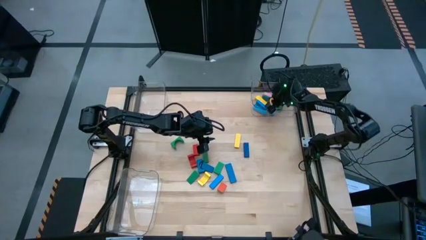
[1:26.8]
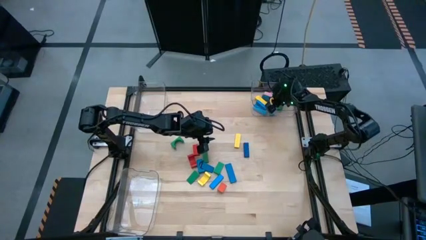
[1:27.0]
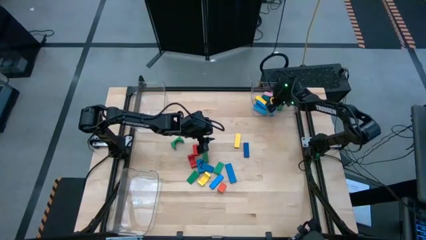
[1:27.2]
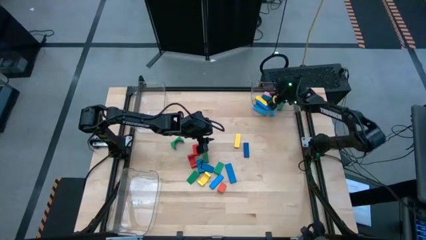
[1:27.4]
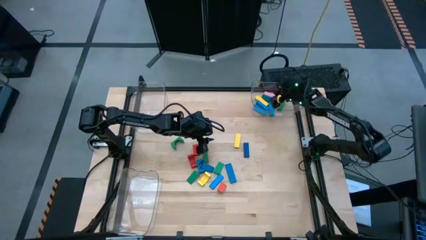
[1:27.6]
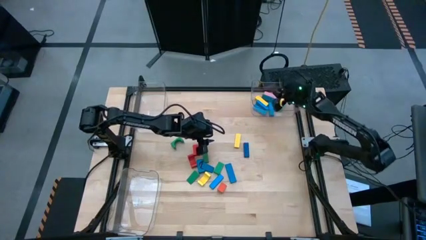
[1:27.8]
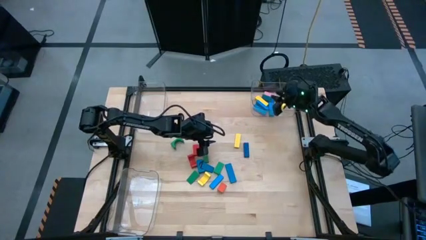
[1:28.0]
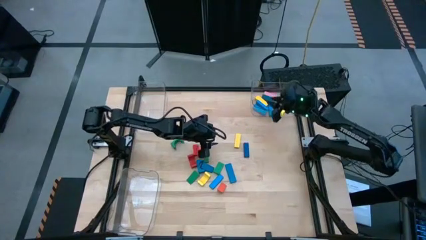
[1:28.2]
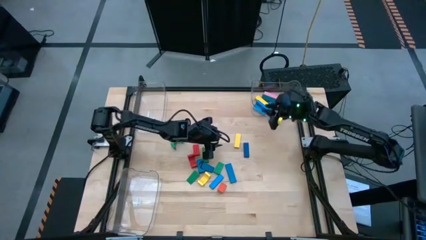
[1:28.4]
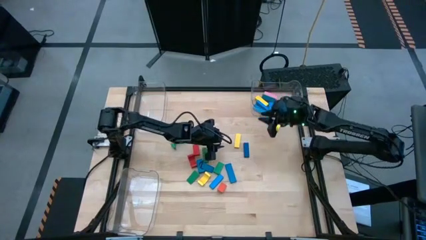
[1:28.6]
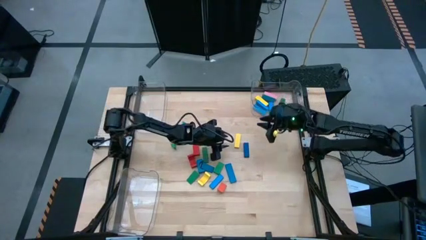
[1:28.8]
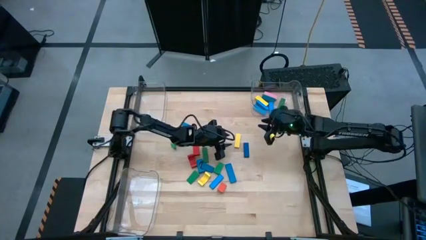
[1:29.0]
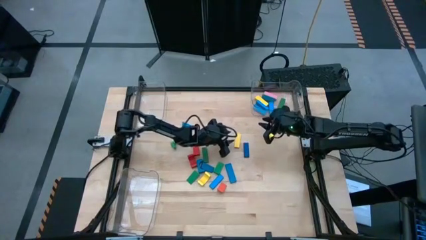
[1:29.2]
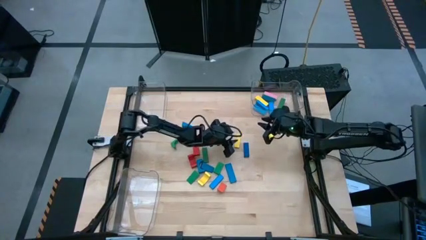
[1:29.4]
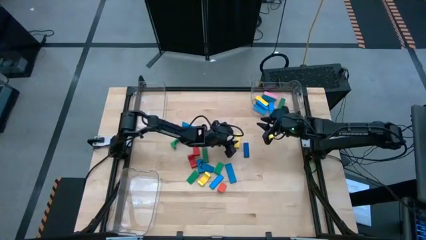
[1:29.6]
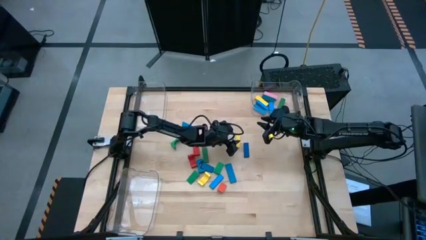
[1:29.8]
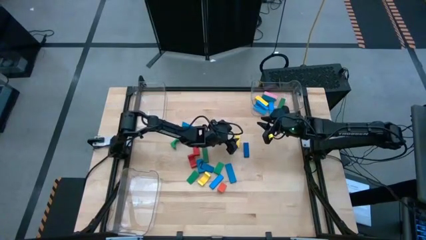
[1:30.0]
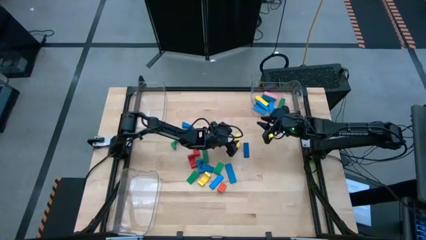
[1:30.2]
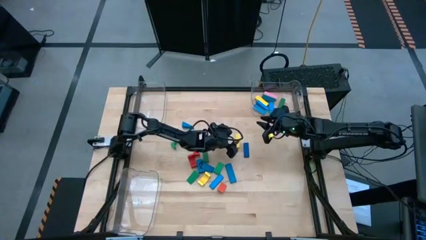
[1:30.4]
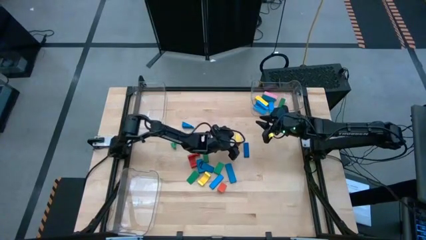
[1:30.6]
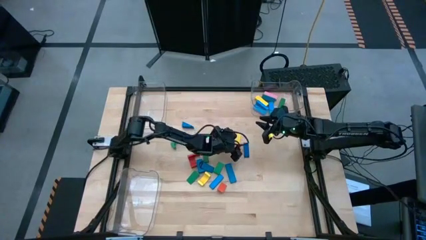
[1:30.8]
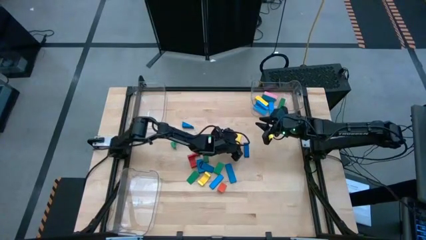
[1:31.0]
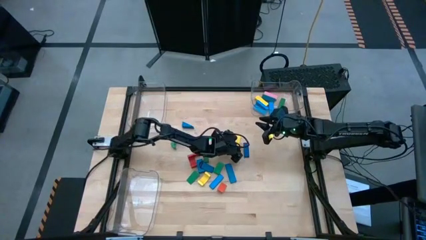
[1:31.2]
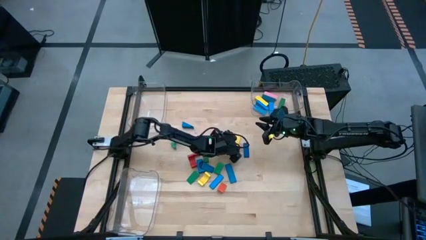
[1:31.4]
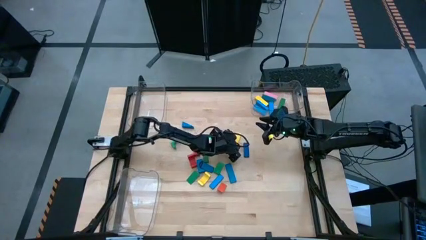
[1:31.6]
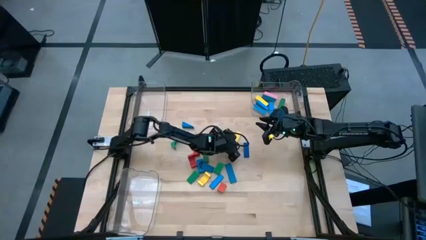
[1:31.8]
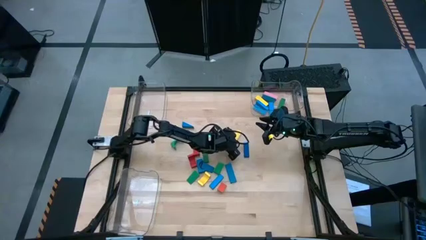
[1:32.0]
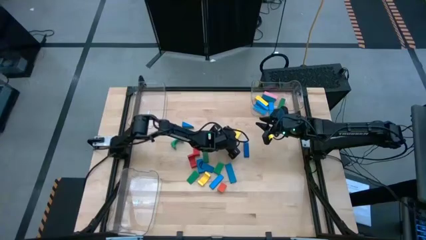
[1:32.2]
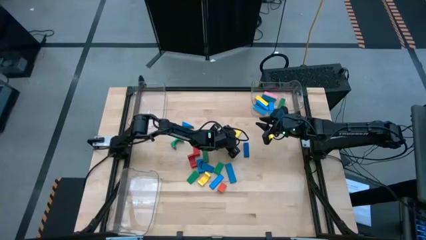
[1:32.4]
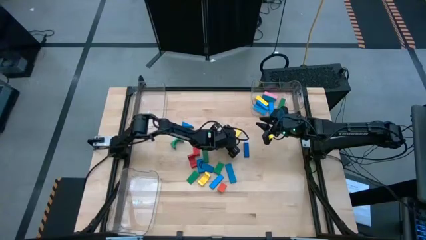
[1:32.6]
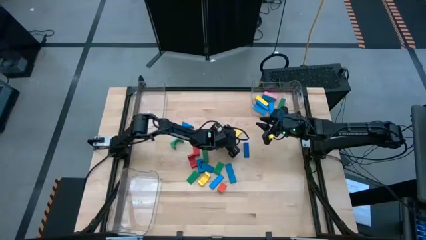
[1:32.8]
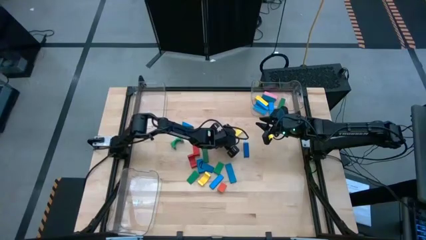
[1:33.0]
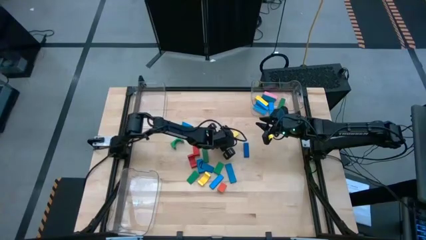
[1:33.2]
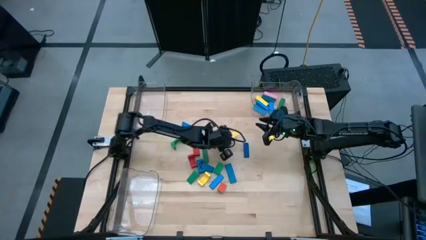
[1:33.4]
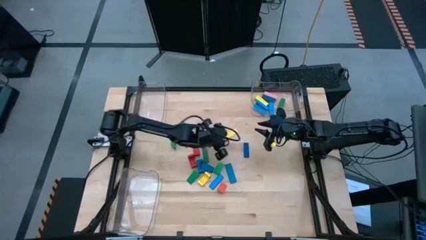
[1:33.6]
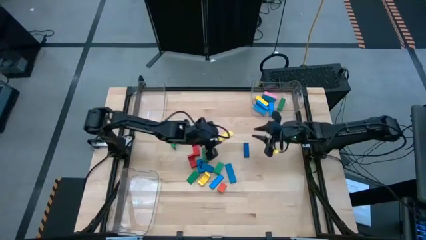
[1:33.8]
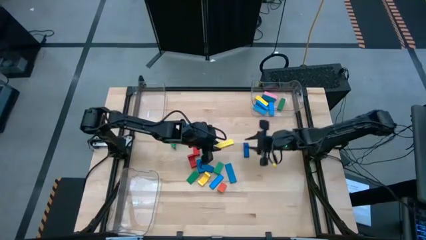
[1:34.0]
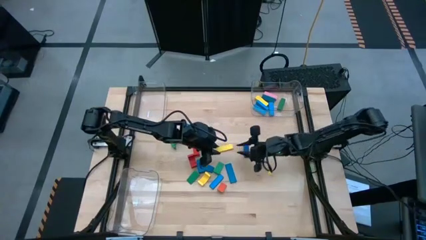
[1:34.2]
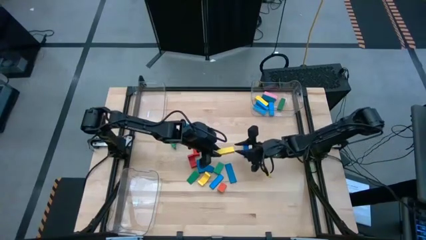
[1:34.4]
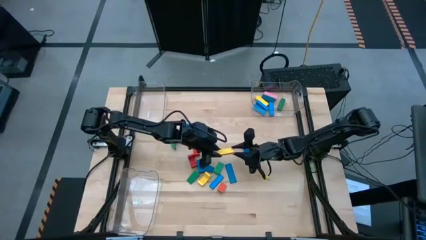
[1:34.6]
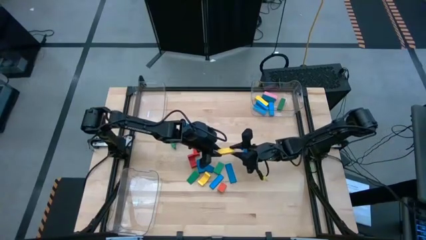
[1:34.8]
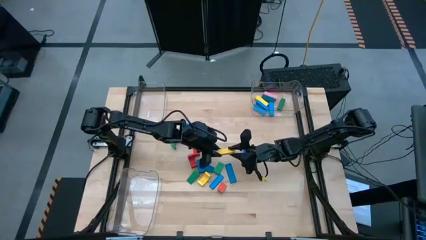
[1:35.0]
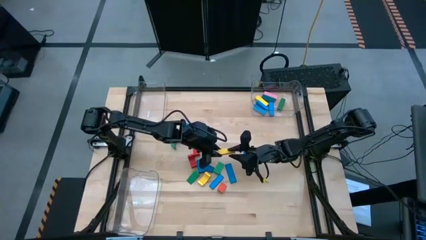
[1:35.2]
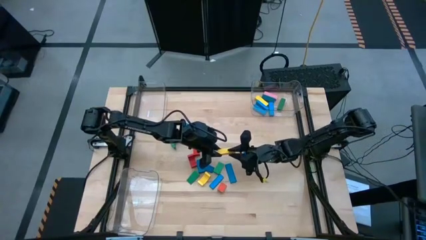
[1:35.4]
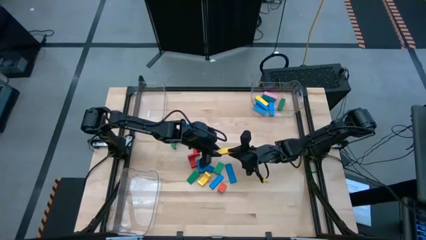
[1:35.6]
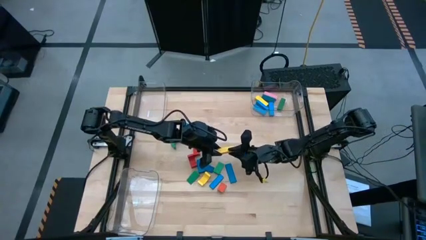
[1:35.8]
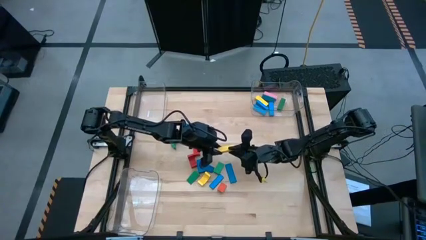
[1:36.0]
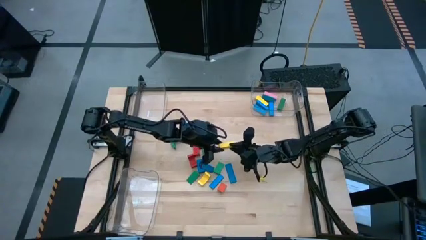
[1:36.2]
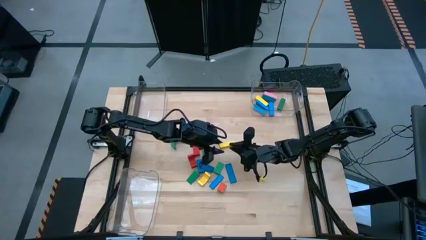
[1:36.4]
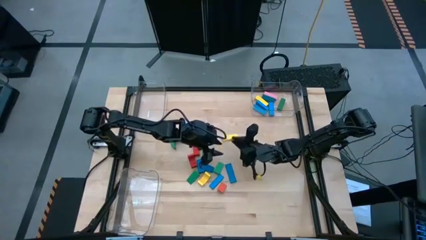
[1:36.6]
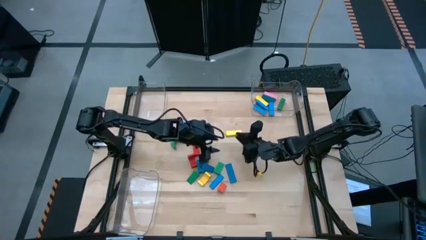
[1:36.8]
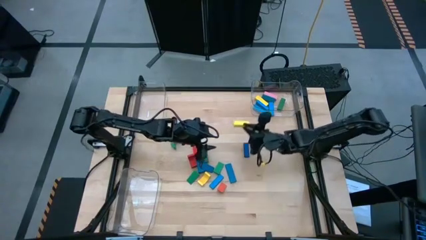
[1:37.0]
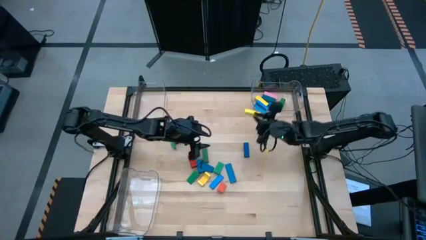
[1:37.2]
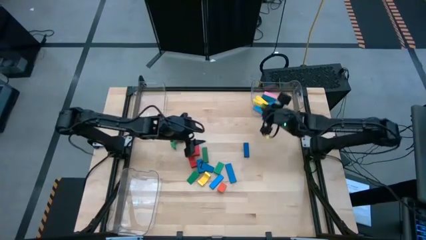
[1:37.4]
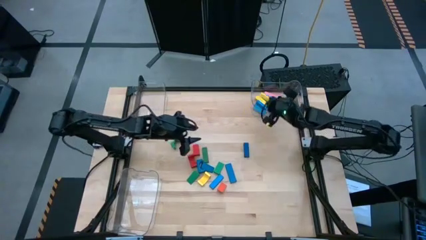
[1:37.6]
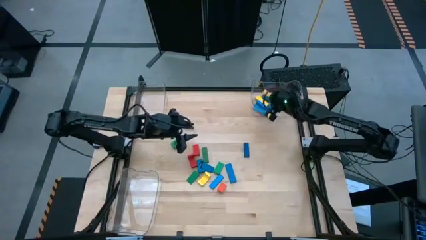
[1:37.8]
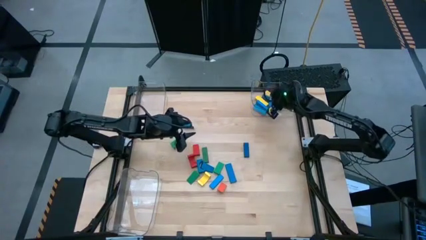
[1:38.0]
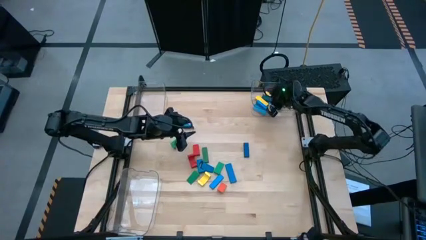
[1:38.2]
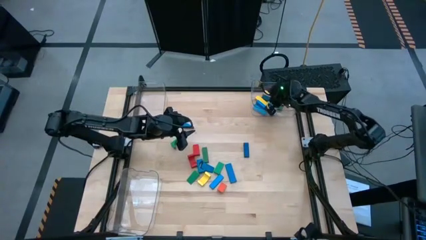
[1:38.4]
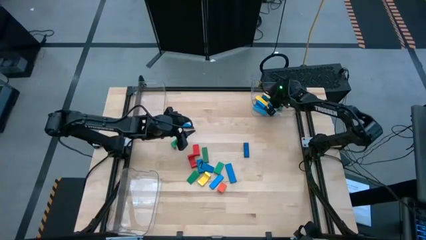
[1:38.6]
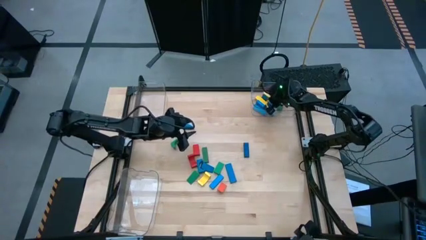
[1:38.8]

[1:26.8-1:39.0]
Task: Sort blocks by size
Put the yellow rectangular block into the top right transparent bin

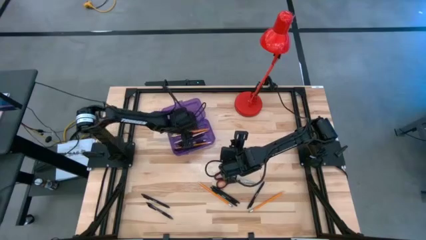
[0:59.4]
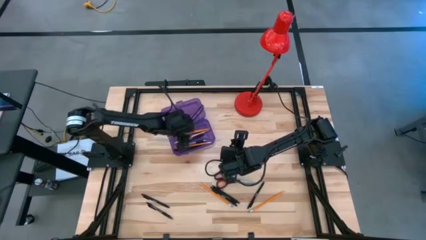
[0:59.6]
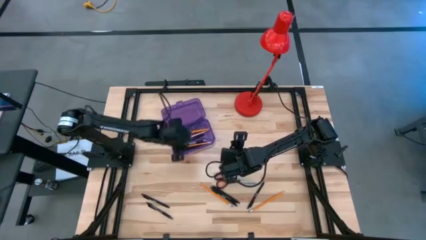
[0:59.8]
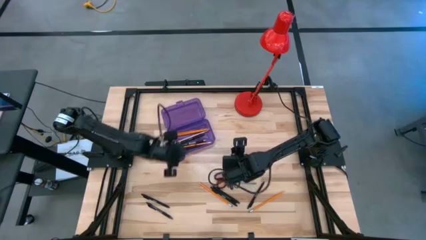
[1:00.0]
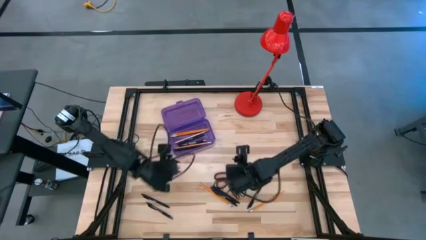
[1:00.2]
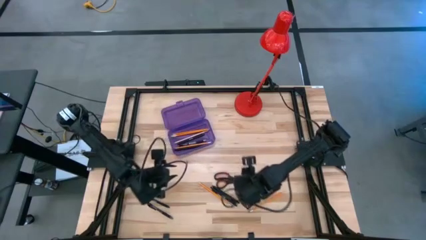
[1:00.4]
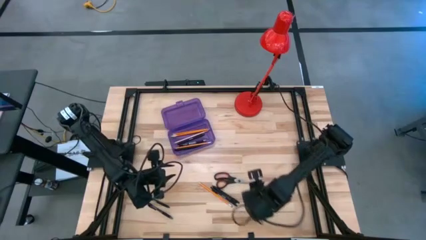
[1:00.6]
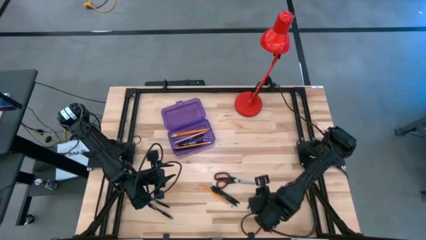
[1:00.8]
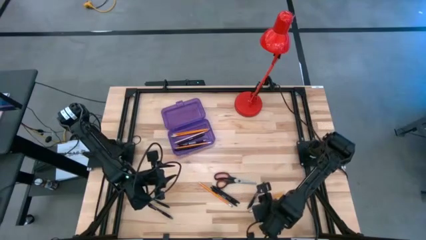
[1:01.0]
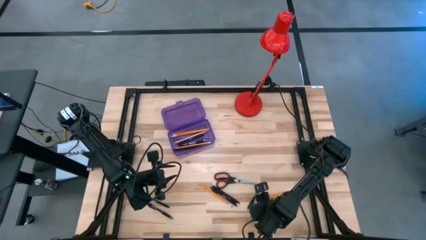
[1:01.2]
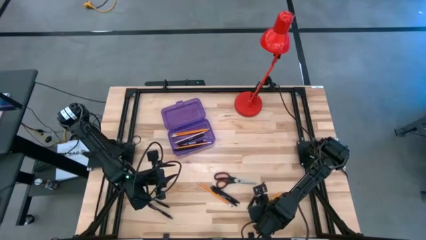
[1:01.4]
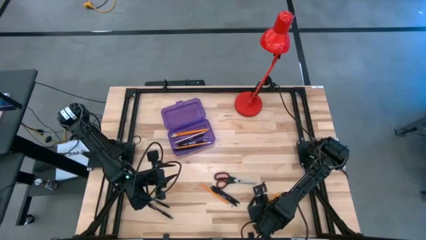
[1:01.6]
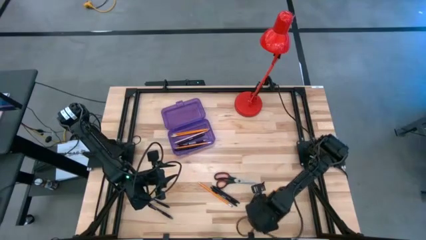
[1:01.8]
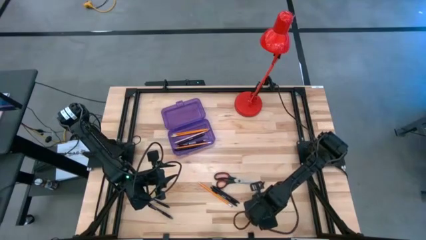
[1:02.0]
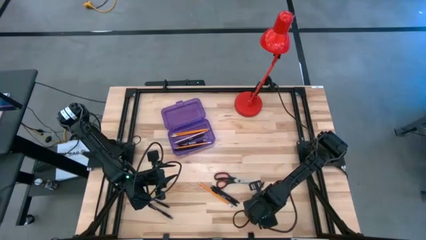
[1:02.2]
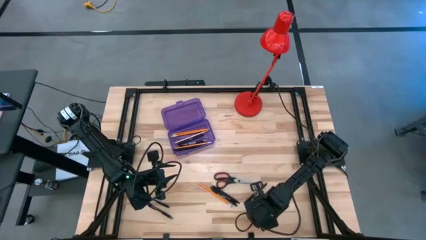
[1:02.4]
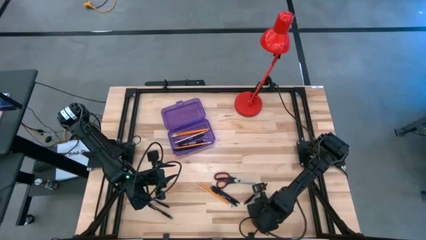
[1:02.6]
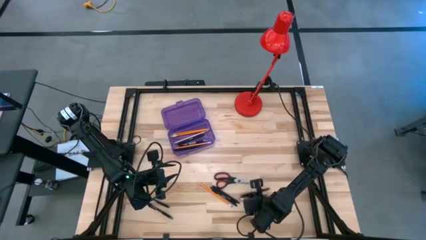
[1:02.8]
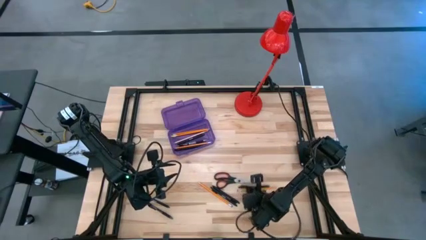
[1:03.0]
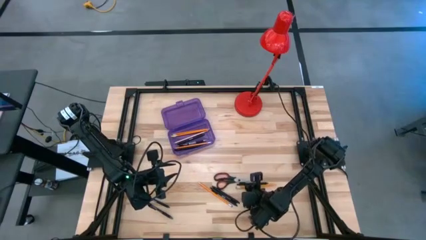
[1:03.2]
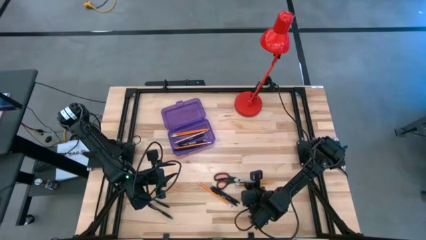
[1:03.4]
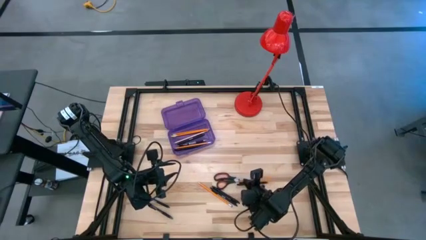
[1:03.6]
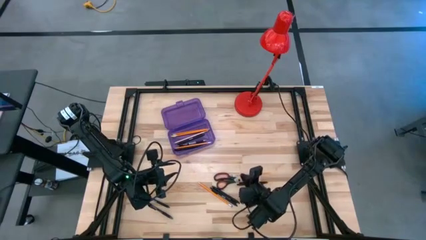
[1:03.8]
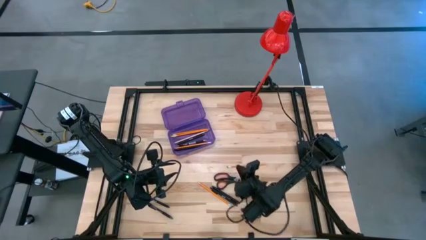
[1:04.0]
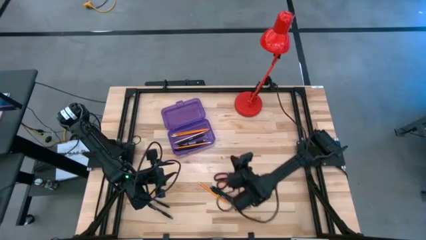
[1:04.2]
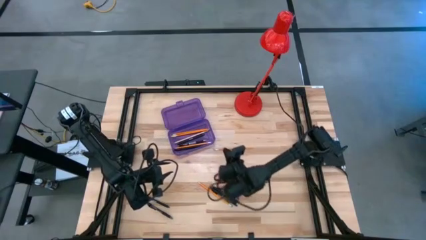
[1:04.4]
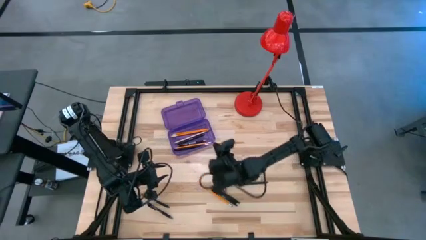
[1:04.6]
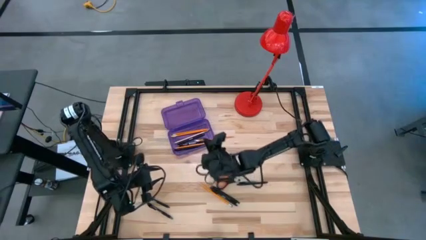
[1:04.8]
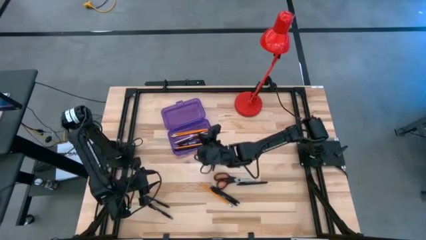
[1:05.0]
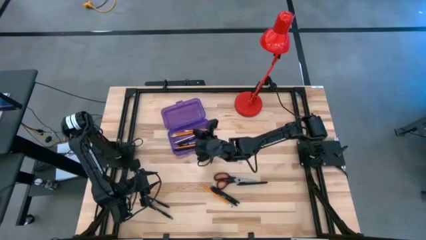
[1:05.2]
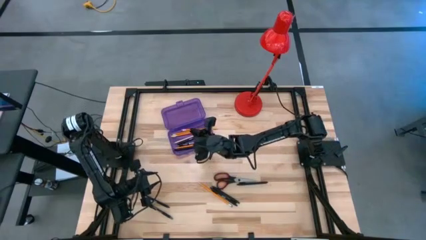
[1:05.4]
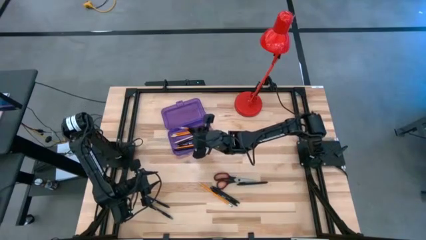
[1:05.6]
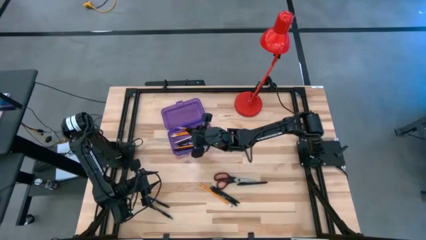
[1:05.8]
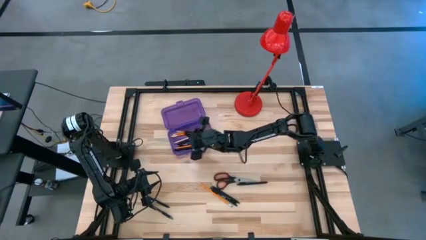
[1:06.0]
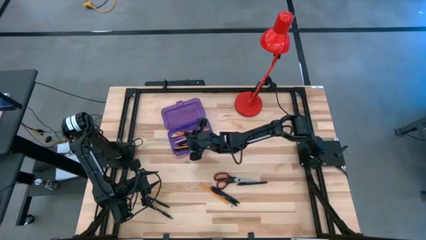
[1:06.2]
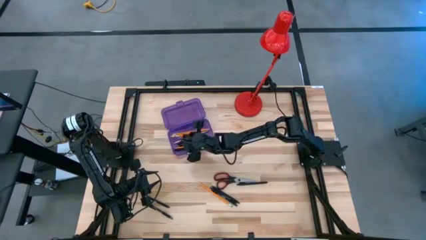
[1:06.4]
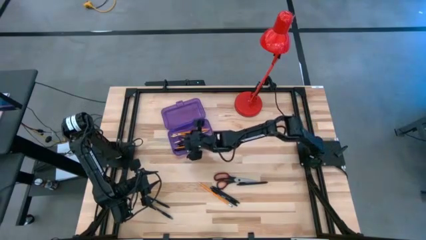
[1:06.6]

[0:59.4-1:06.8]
Task: Pick & place school supplies into a supply box
Put the yellow pencil into the purple supply box
